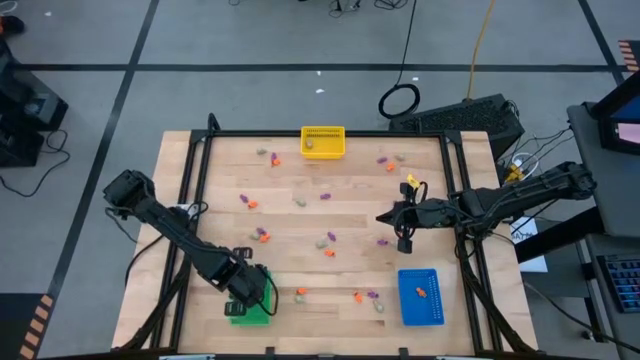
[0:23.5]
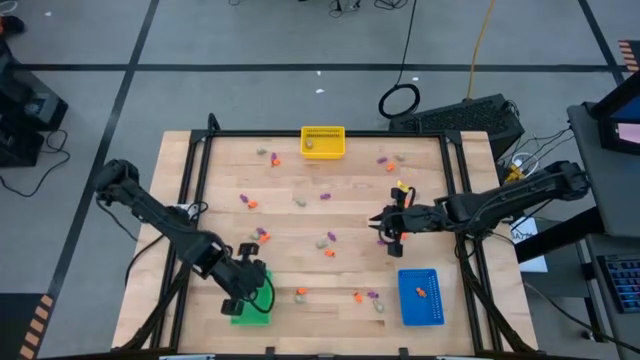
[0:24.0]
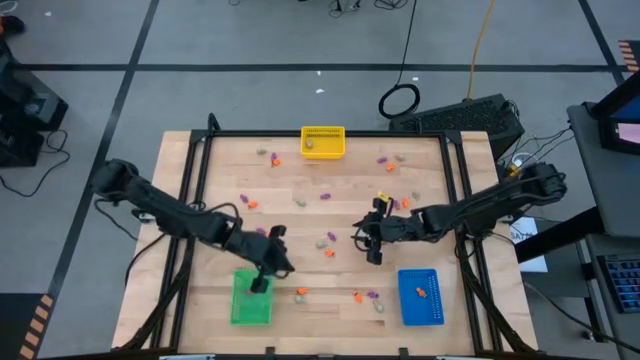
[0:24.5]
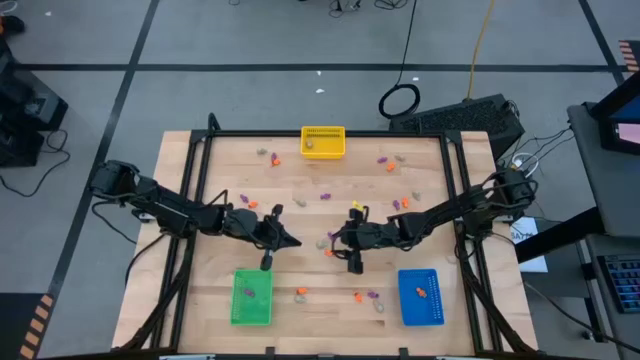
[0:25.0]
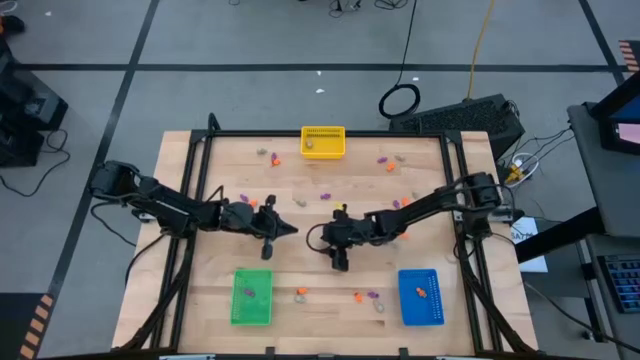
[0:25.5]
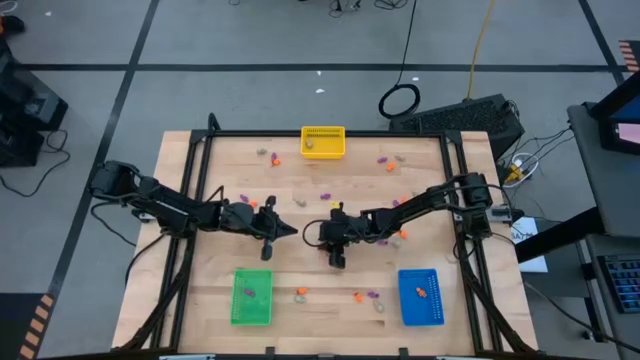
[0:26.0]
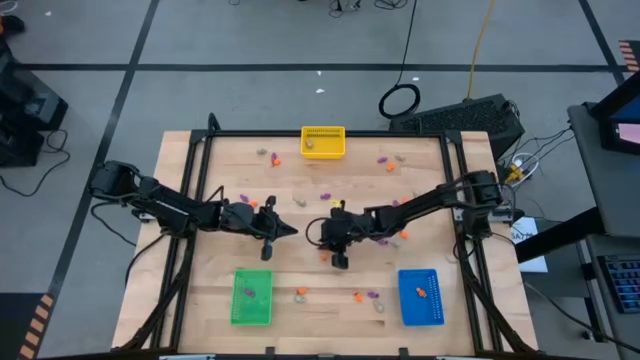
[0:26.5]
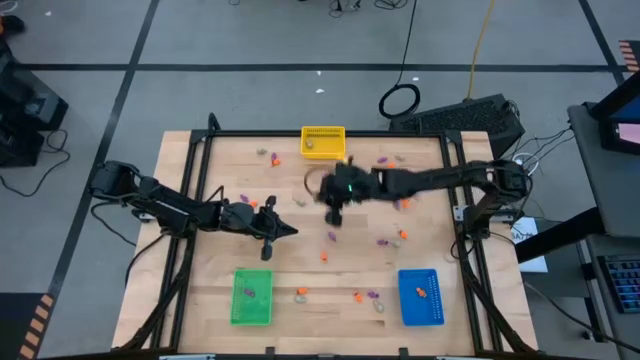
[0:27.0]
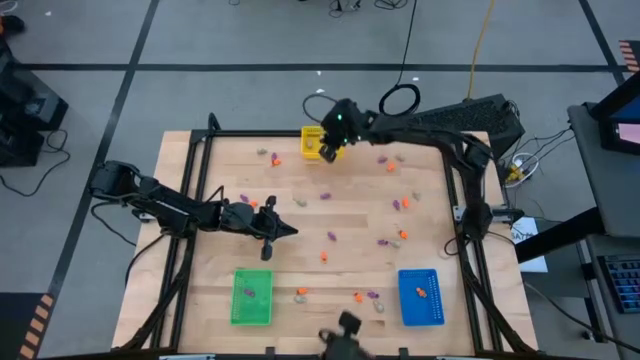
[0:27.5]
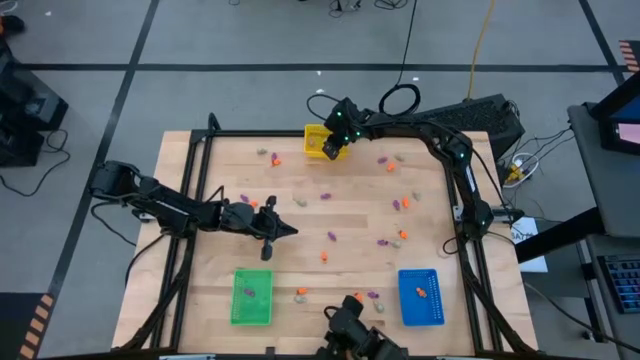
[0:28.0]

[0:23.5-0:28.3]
Task: Sort Halloween decoration
Put the gray skull toy into the yellow bin

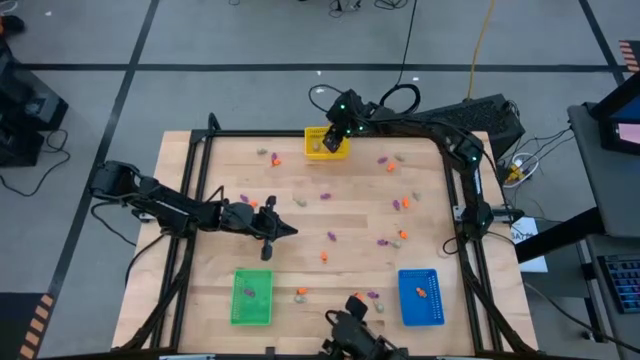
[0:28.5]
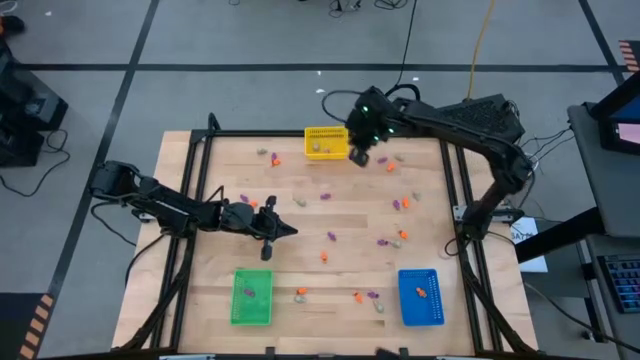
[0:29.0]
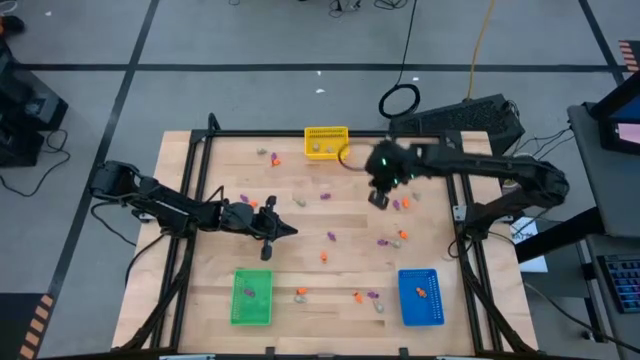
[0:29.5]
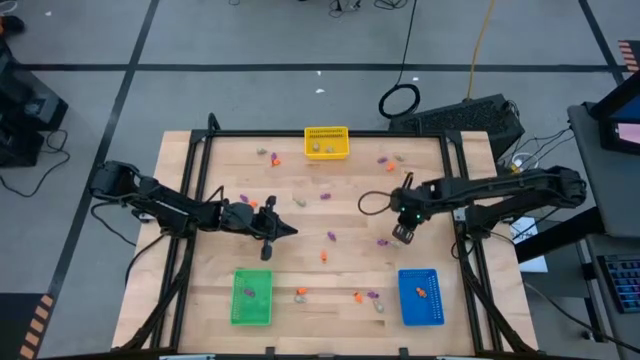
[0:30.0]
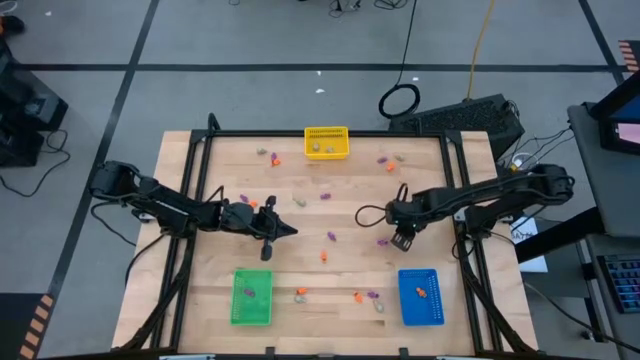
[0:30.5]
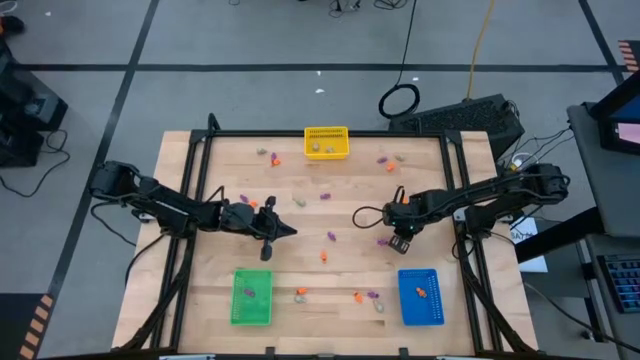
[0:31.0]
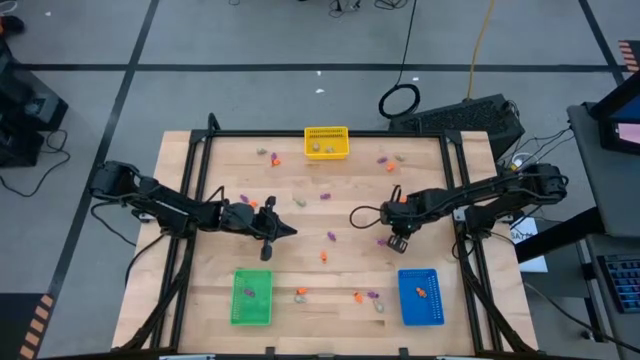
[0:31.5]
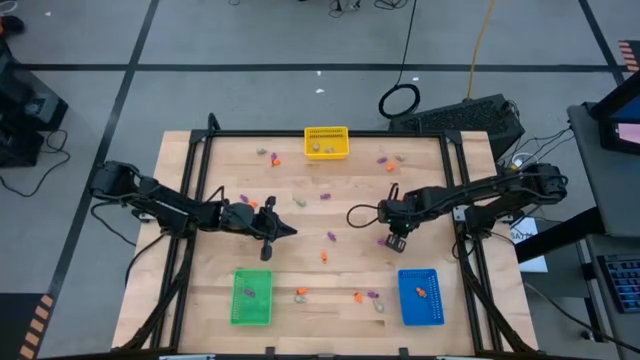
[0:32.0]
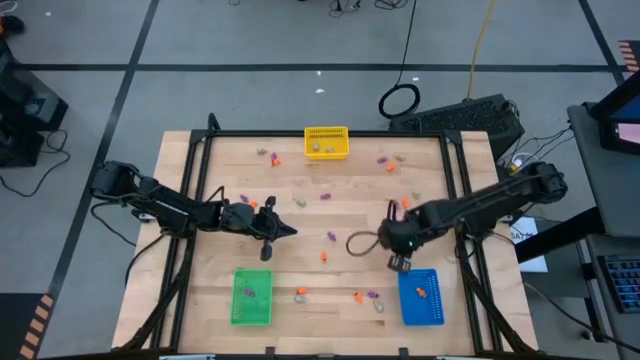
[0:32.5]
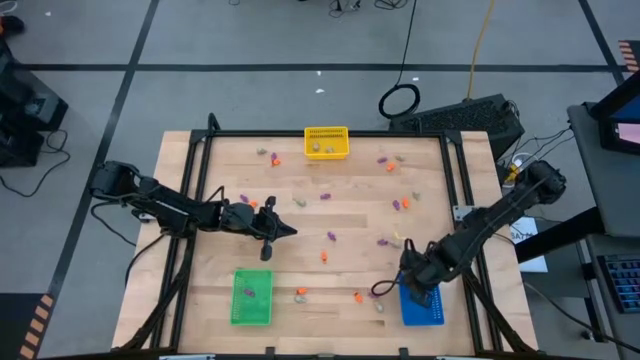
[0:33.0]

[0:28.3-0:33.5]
Put the orange skeleton toy into the blue bin

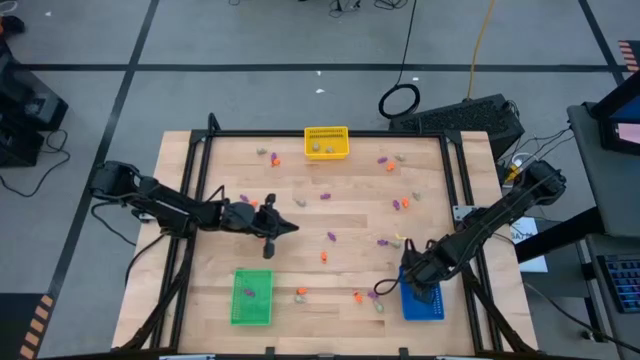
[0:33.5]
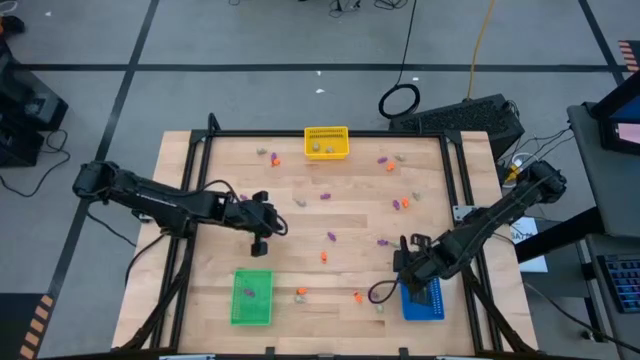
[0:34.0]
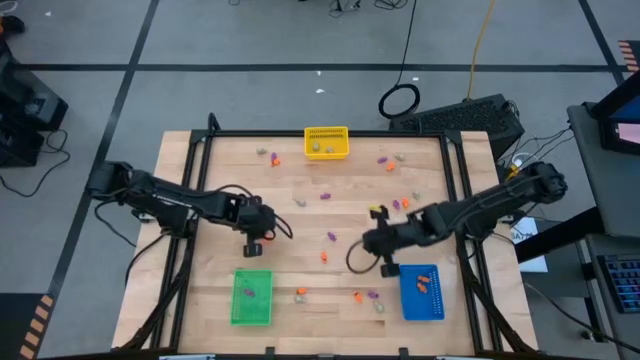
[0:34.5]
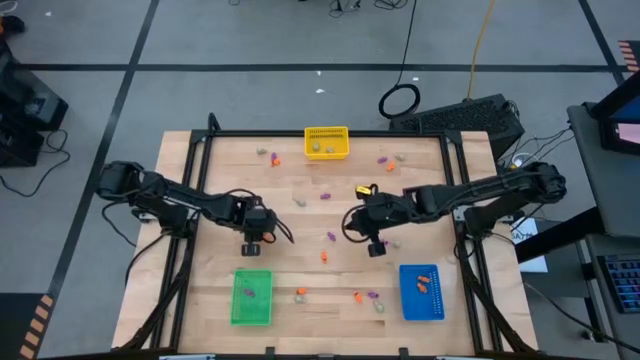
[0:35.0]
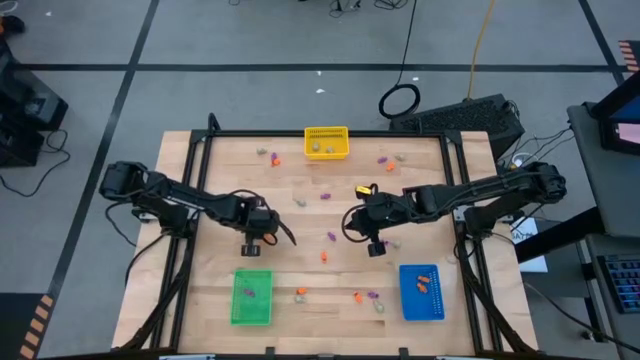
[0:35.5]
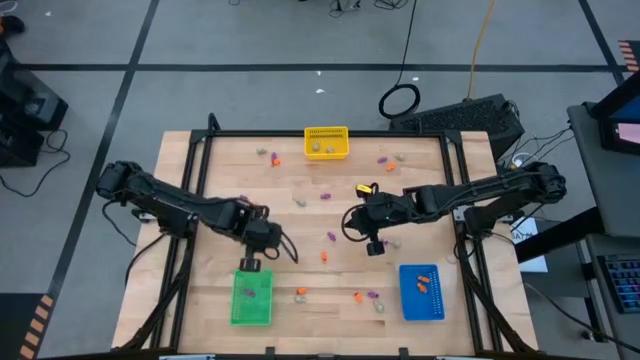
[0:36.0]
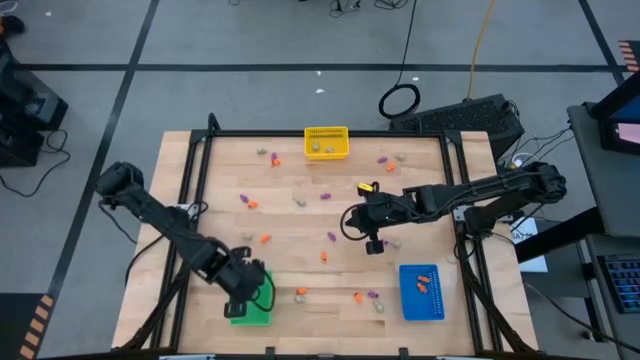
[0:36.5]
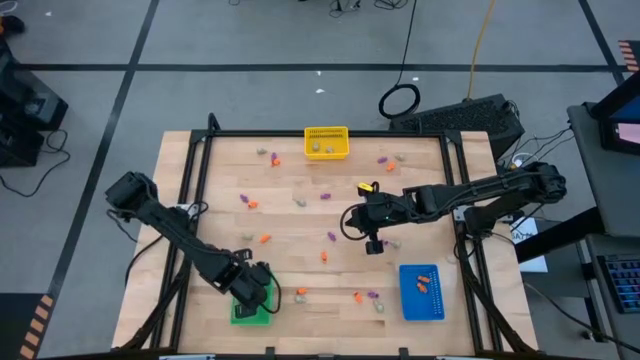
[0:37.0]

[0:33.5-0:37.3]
Put the purple skeleton toy into the green bin

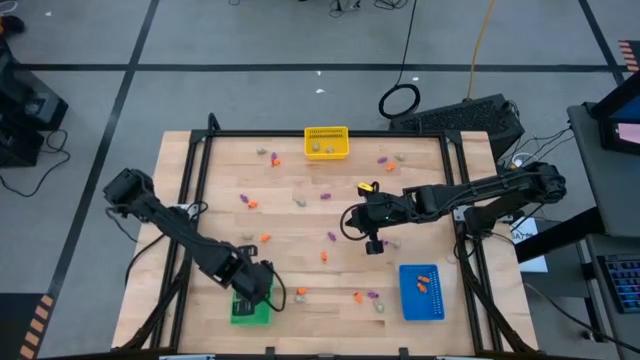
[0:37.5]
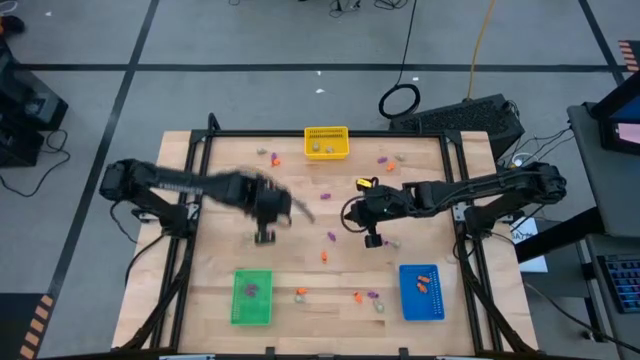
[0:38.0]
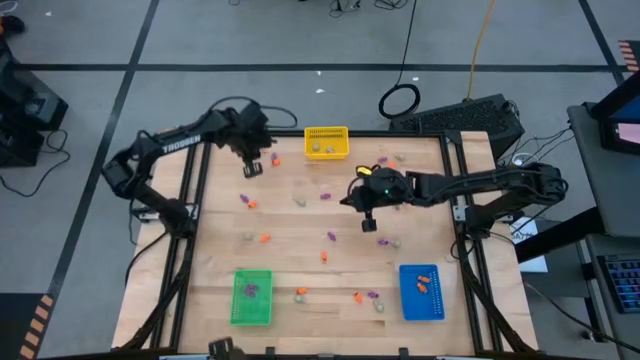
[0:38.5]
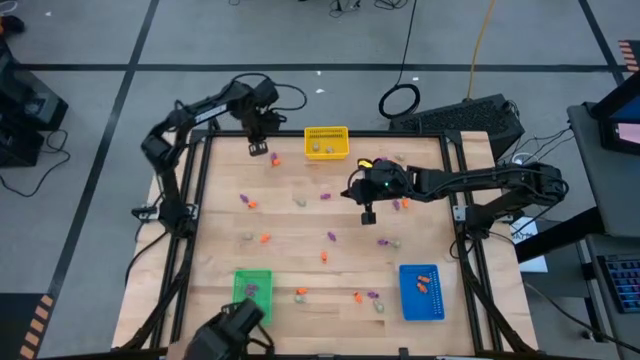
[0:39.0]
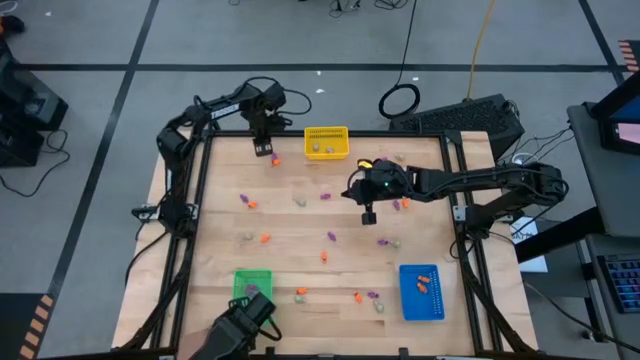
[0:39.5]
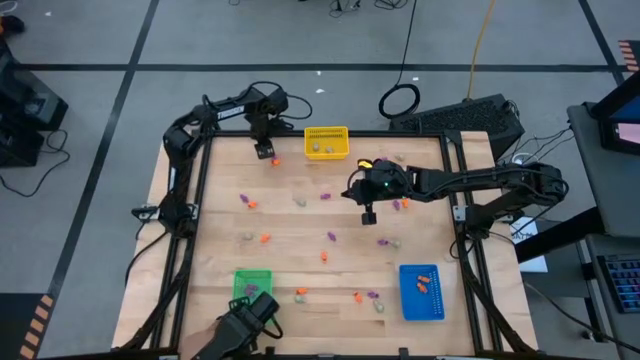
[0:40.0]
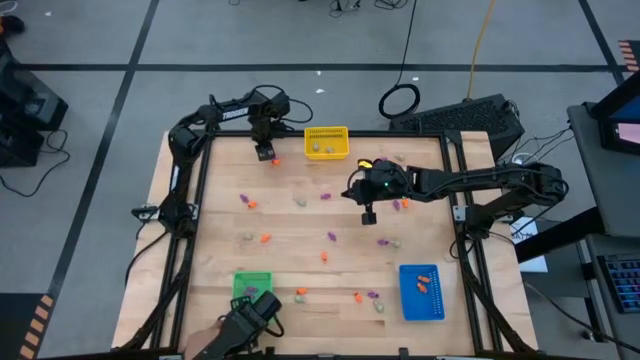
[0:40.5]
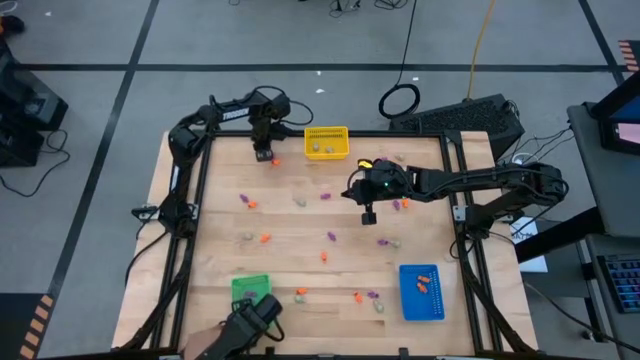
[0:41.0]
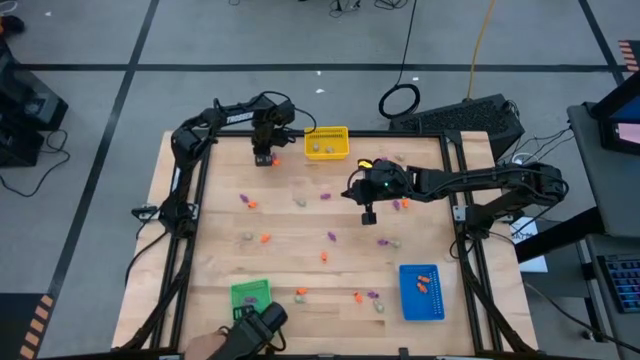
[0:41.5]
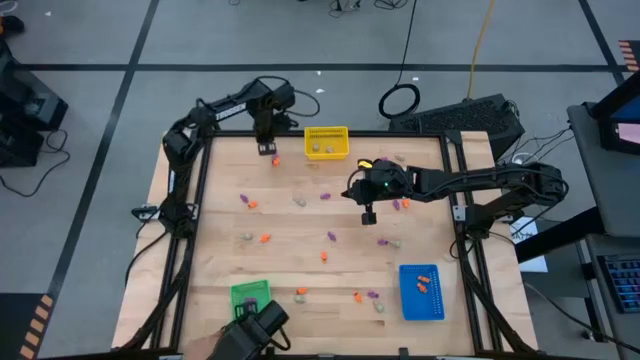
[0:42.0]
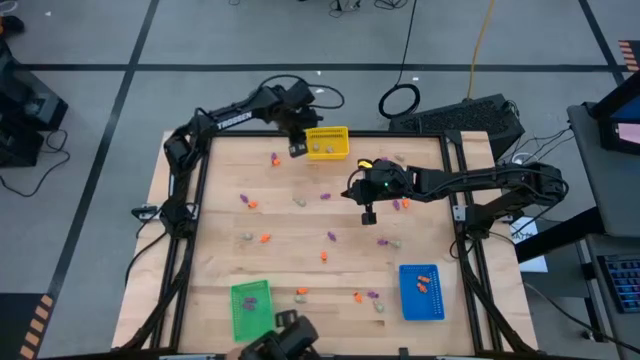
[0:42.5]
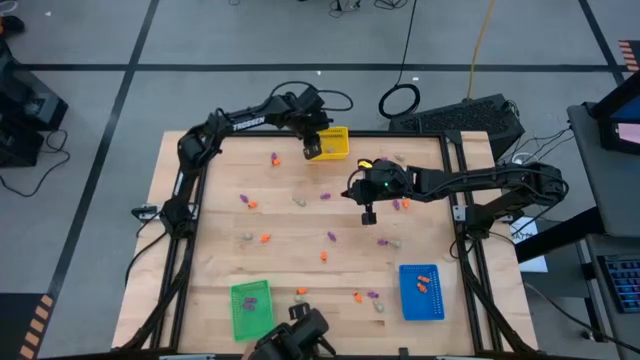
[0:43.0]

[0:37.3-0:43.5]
Put the gray skull toy into the yellow bin

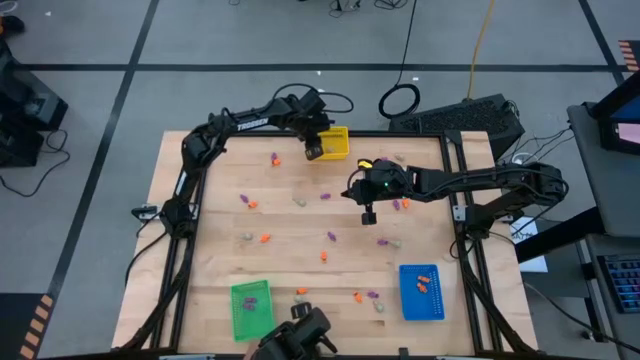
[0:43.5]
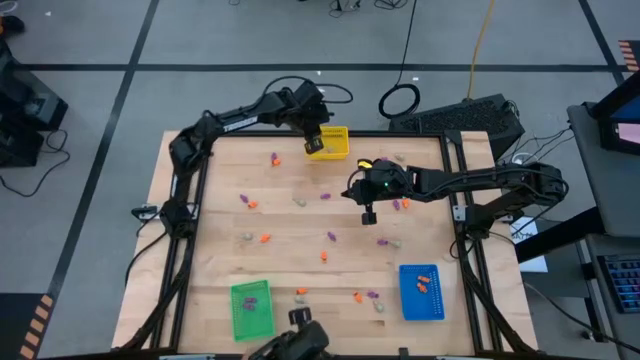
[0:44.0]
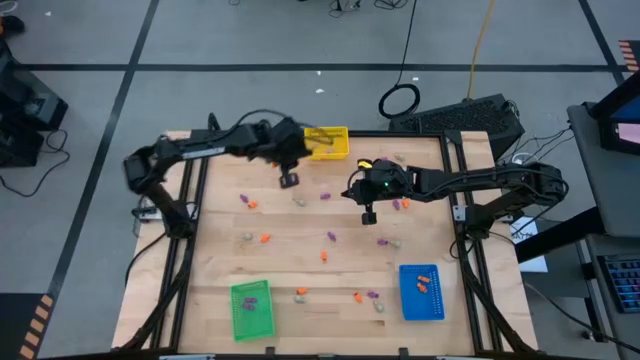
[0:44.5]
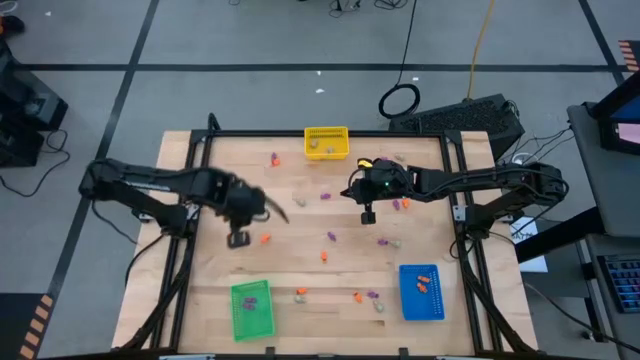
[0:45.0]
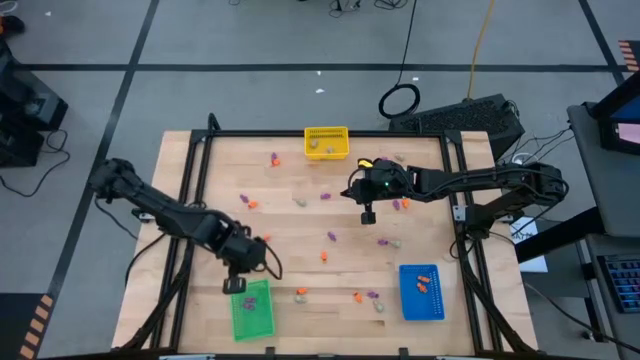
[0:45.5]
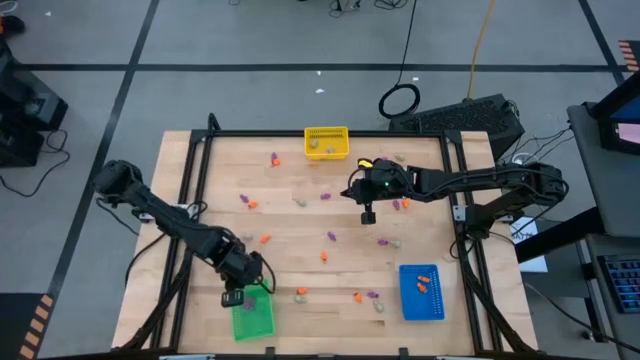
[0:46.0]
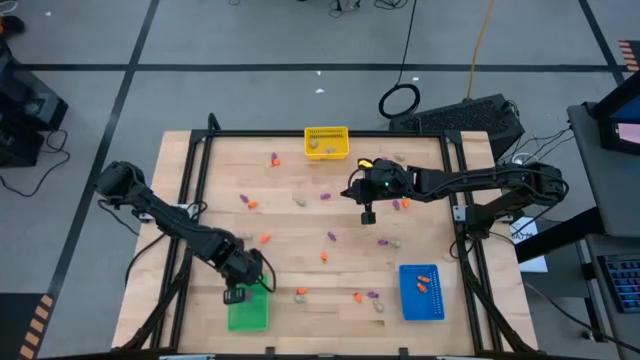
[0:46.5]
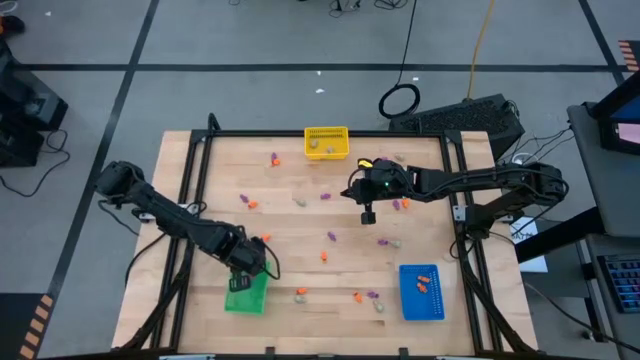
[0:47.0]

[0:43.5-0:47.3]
Adjust the green bin
